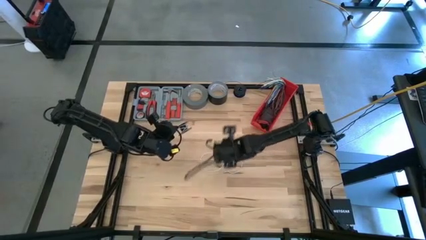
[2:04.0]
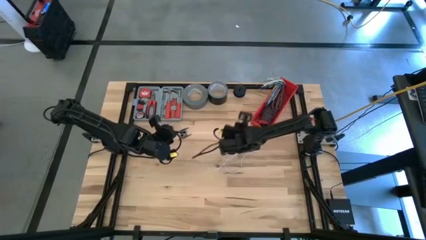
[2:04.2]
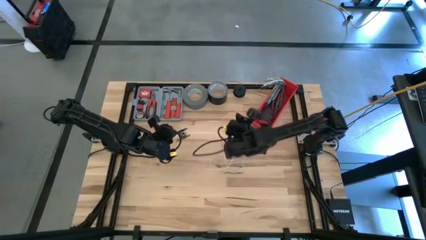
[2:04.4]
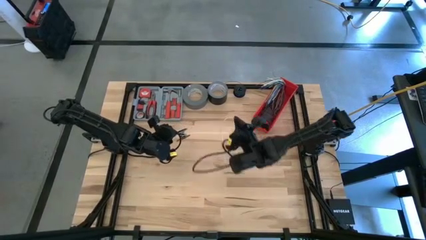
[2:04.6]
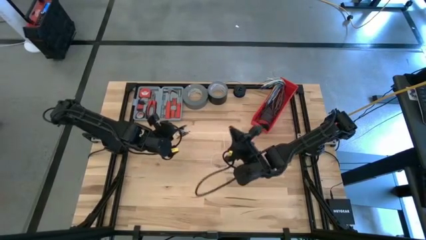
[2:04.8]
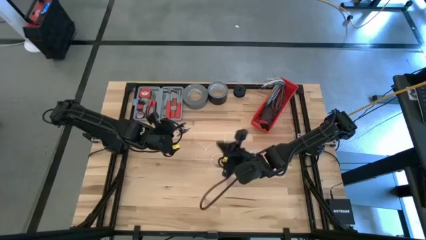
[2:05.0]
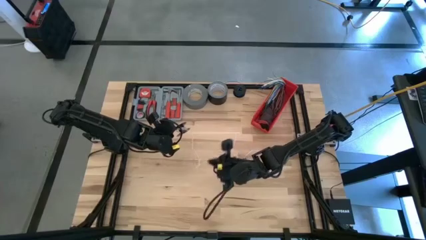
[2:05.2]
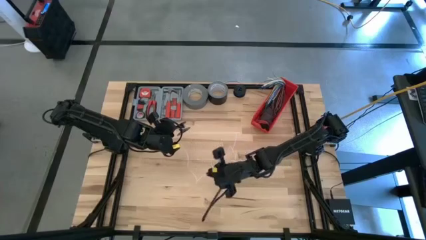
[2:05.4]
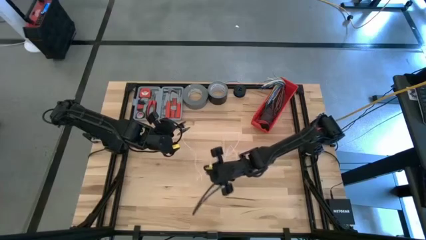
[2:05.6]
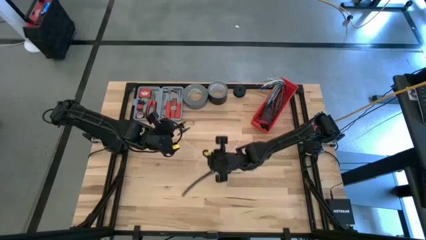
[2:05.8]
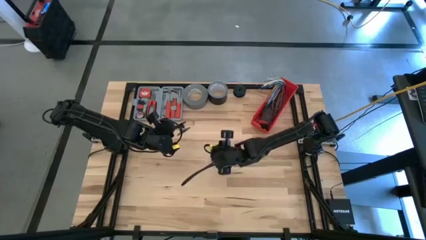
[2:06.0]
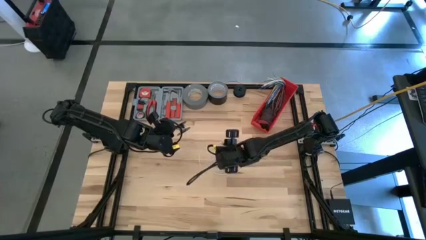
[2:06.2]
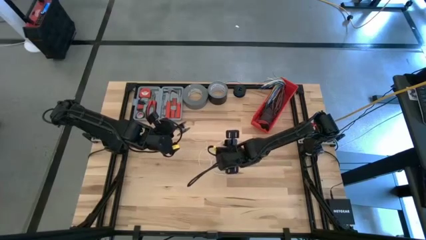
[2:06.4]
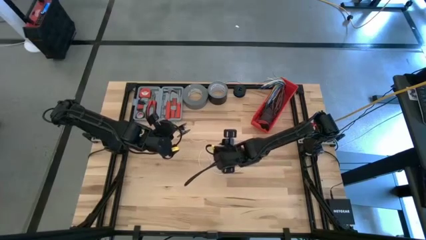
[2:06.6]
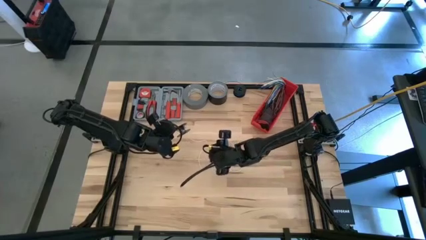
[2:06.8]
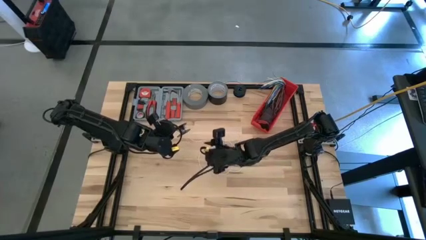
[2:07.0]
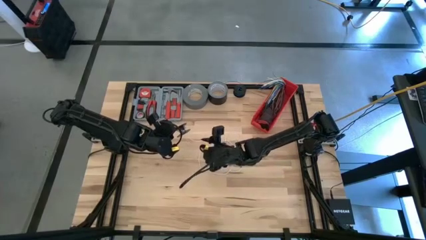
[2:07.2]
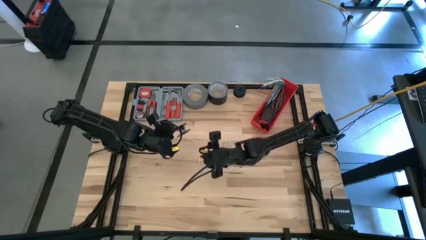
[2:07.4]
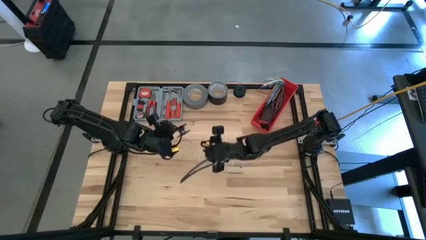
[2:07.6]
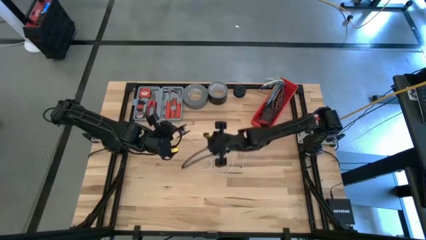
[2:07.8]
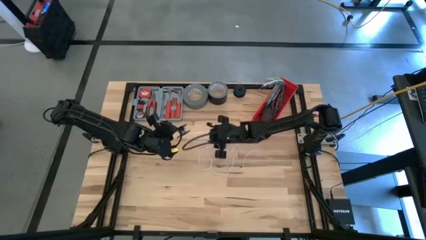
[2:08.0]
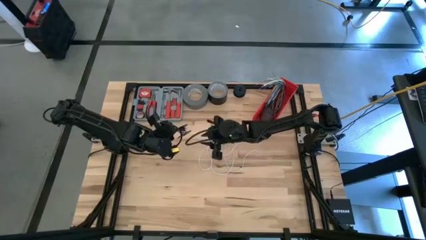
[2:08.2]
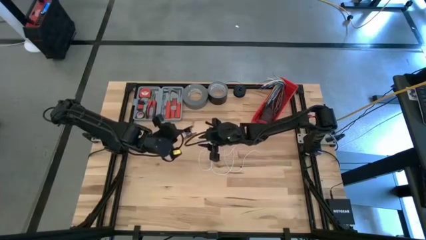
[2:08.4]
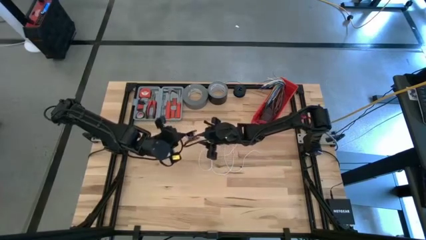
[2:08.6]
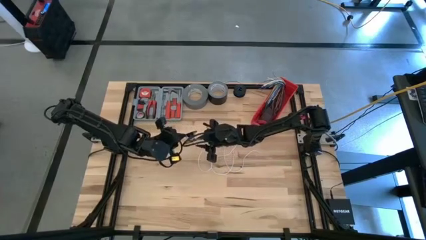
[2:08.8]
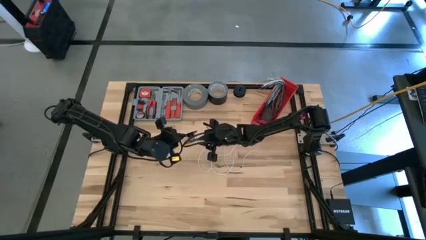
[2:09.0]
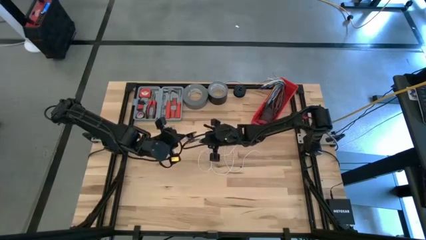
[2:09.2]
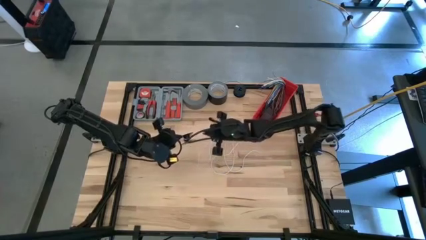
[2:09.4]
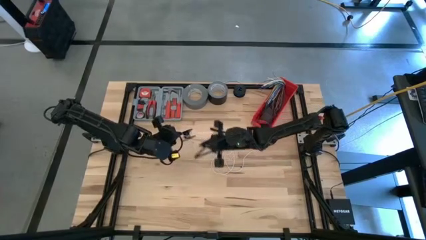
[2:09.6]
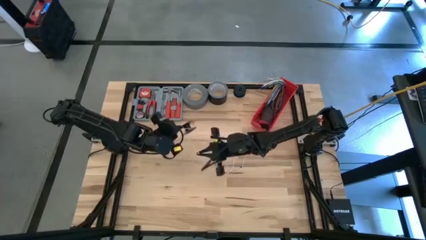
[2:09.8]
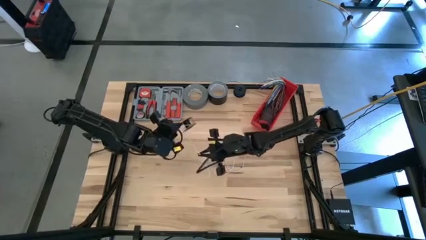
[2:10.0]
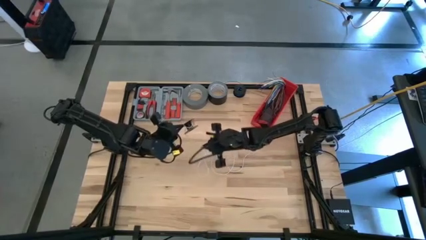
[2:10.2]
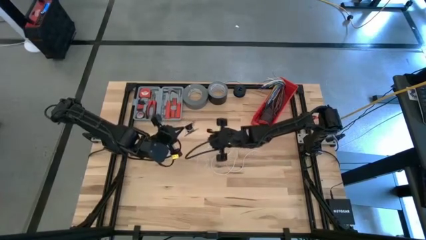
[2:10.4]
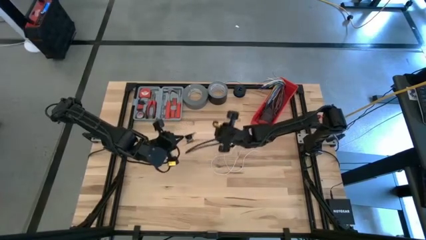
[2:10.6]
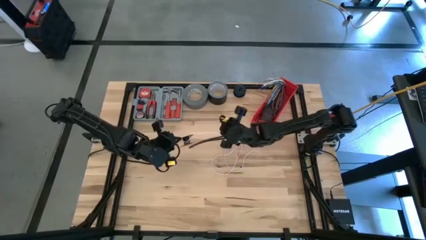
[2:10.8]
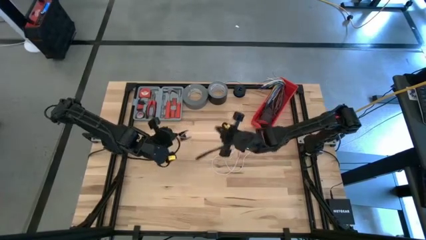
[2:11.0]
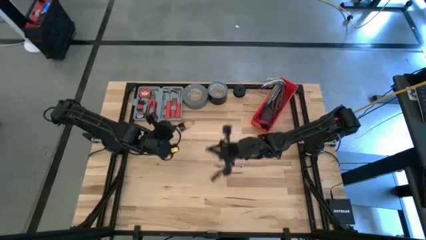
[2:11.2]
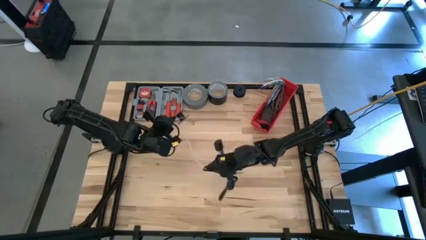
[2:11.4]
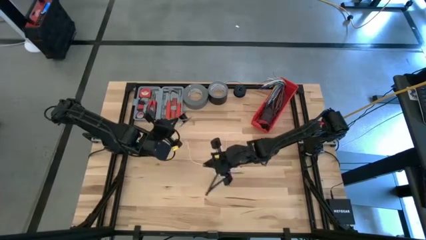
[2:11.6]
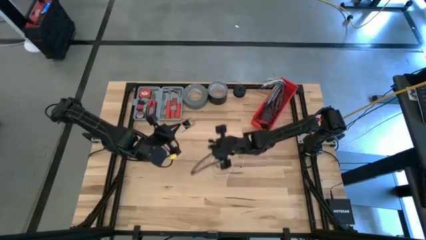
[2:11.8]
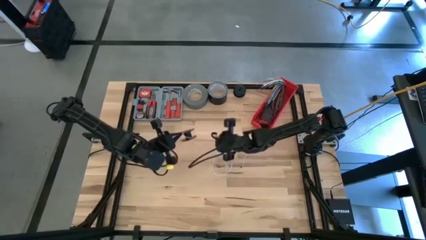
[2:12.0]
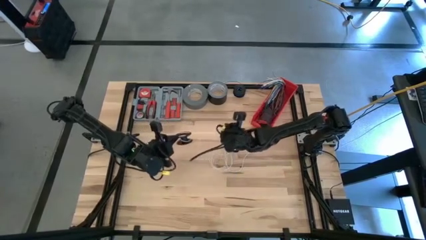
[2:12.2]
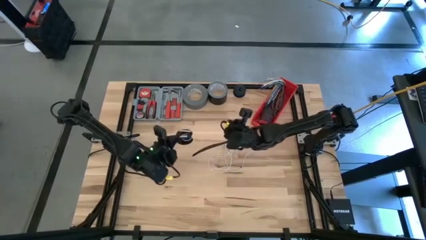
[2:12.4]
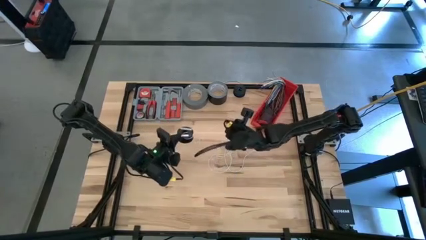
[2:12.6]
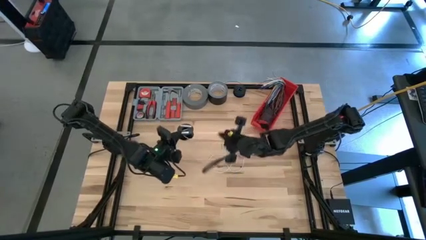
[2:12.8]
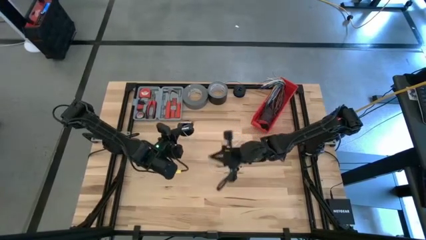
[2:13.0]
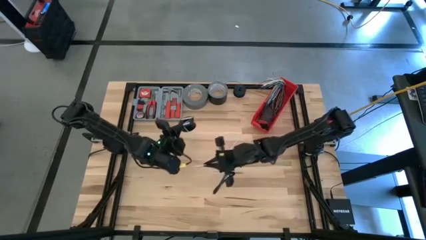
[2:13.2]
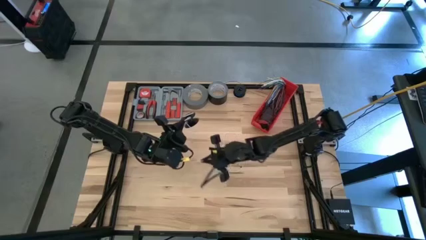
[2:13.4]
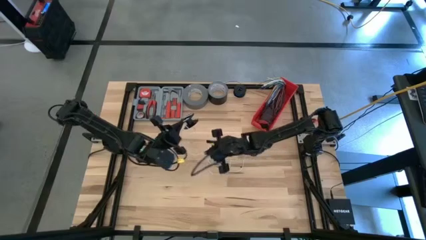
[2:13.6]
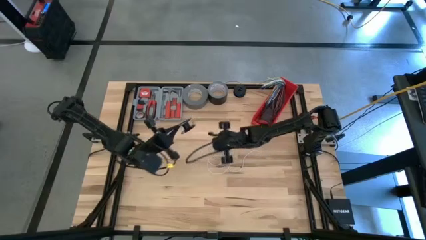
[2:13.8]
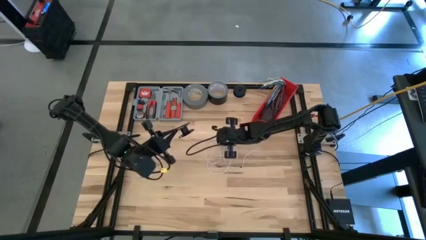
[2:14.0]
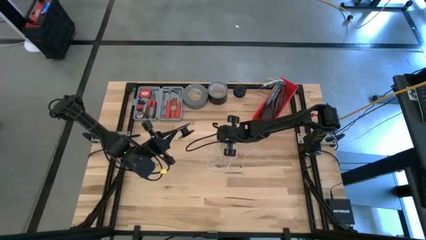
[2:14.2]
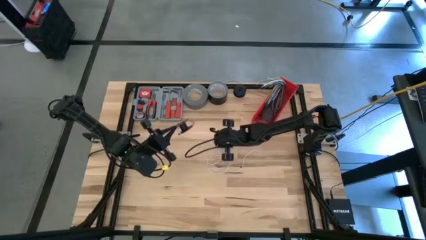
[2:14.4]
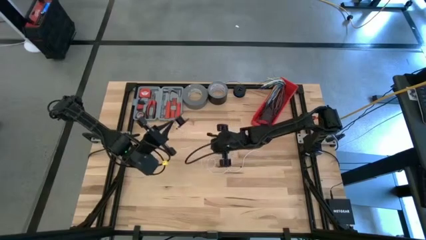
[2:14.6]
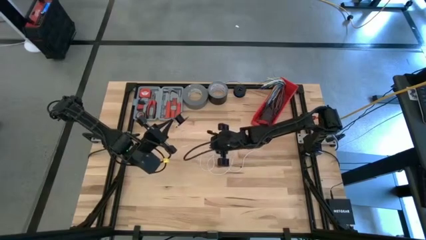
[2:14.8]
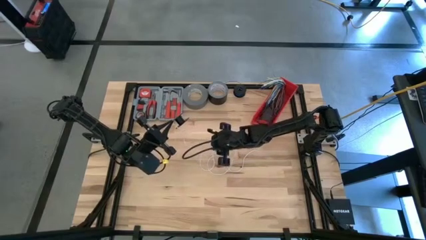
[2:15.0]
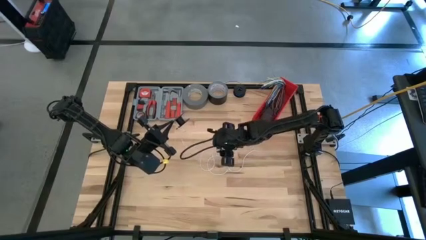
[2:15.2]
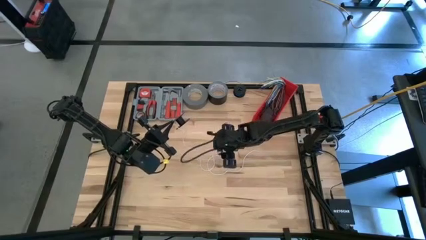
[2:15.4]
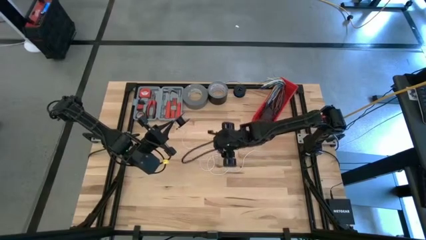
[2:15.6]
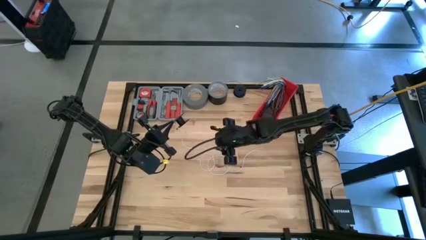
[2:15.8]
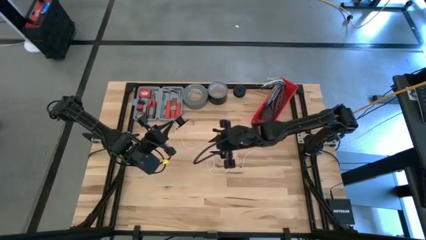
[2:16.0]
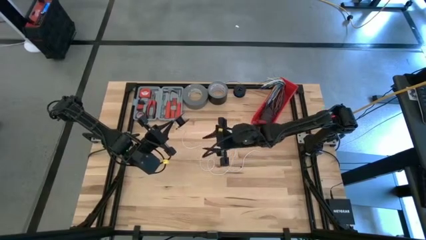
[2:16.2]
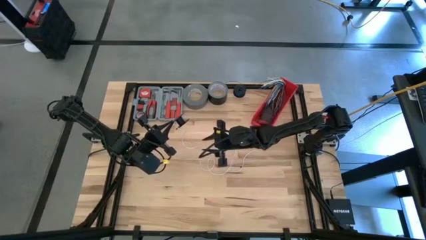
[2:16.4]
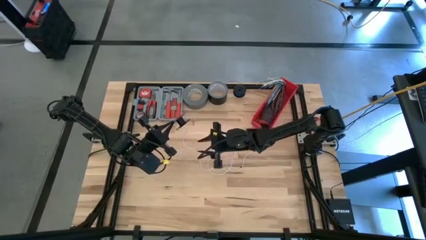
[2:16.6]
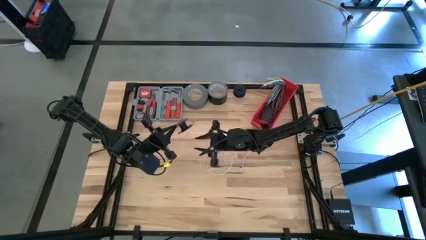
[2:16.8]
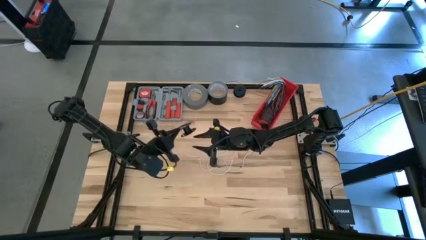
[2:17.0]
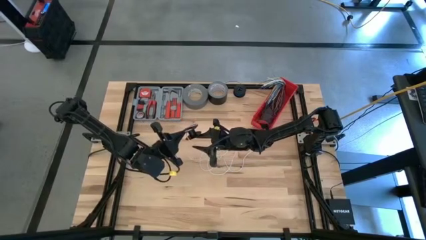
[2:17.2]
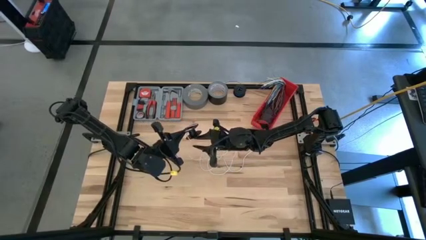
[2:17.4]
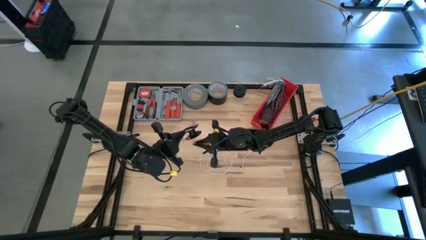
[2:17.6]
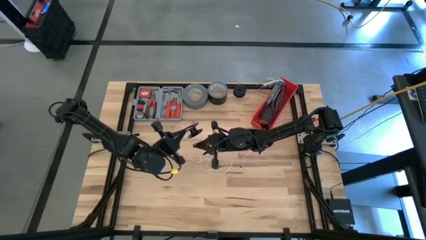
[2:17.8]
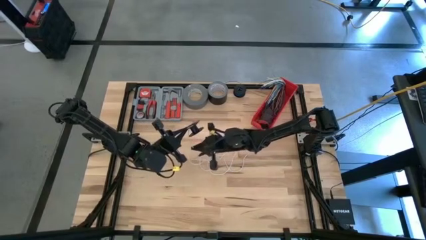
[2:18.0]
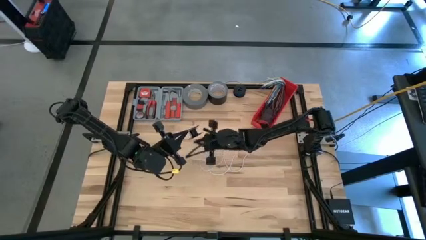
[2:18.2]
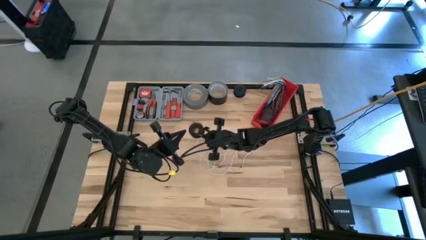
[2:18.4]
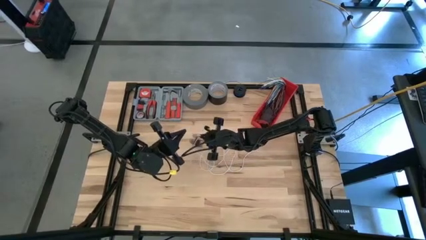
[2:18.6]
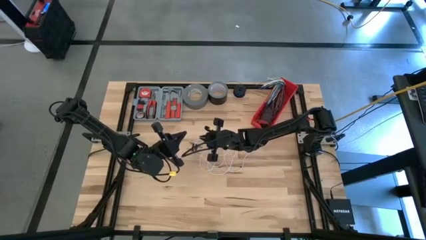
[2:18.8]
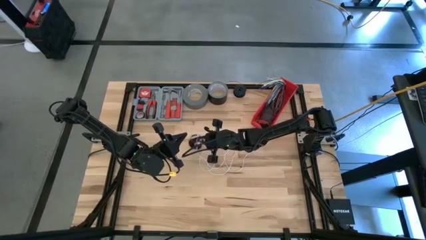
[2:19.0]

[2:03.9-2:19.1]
Task: Coil cords
Uncoil the white wire from the spool
